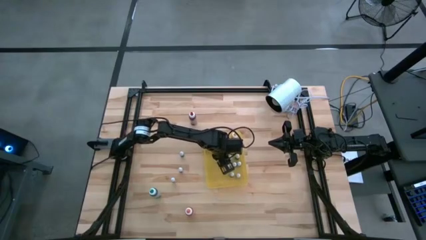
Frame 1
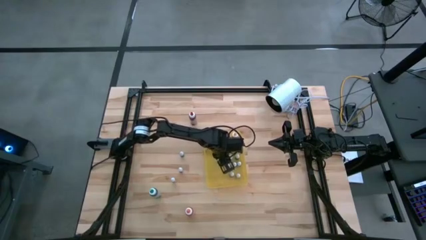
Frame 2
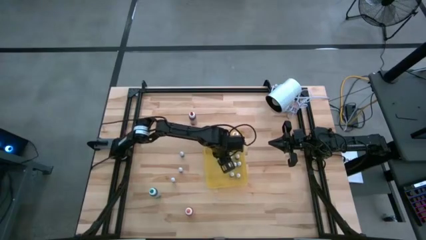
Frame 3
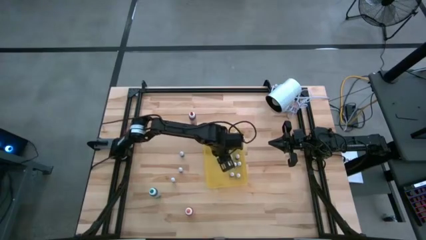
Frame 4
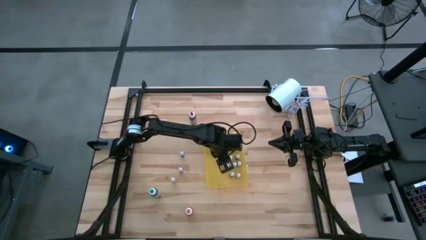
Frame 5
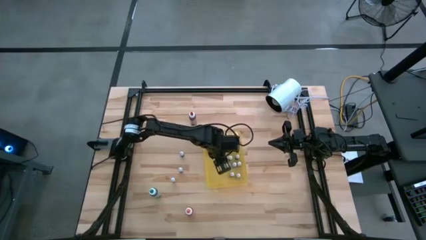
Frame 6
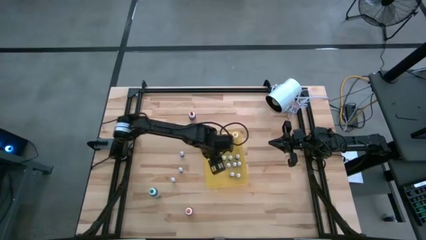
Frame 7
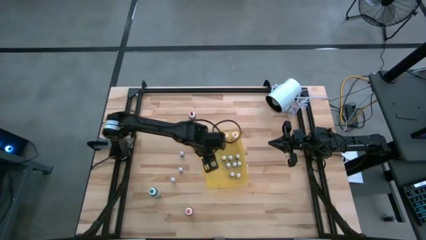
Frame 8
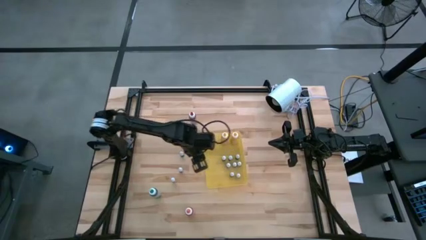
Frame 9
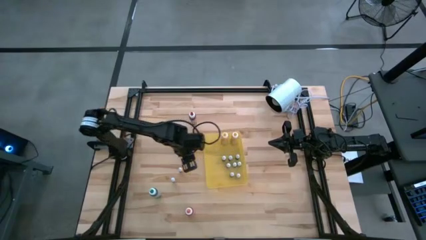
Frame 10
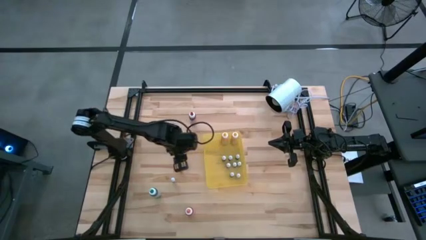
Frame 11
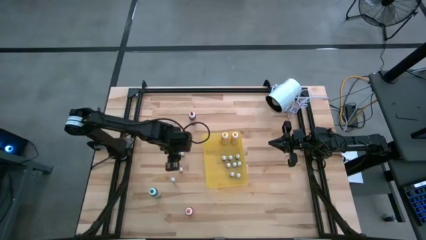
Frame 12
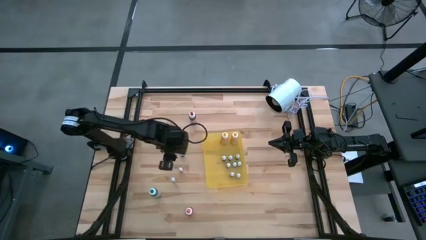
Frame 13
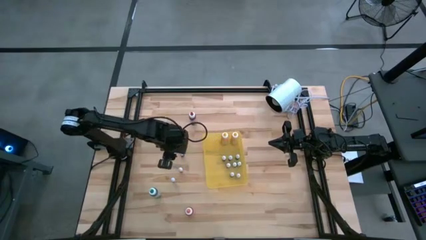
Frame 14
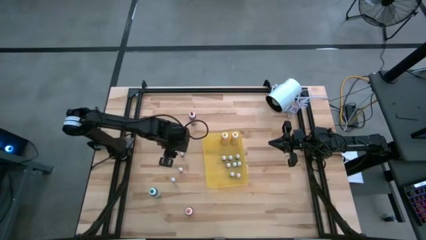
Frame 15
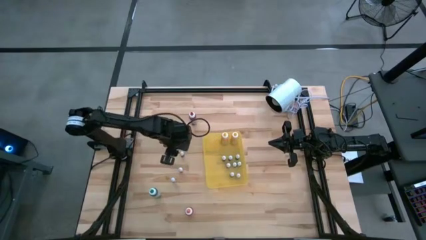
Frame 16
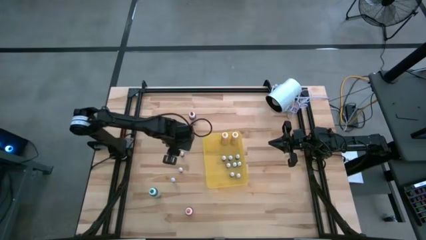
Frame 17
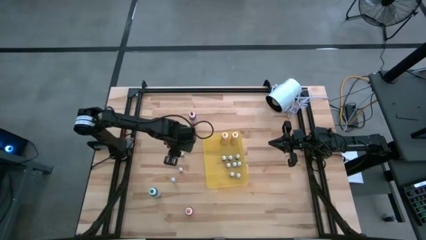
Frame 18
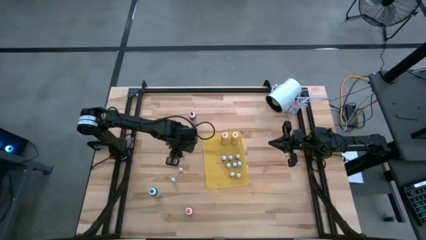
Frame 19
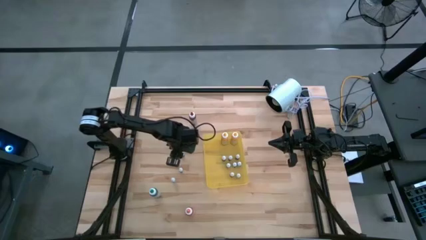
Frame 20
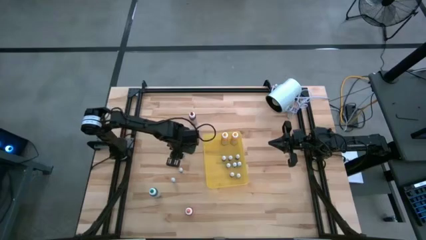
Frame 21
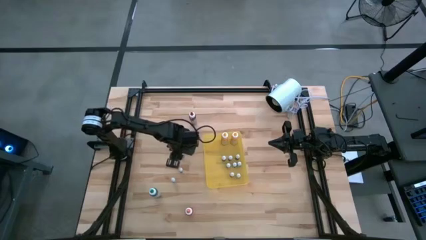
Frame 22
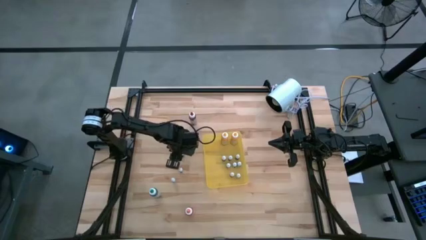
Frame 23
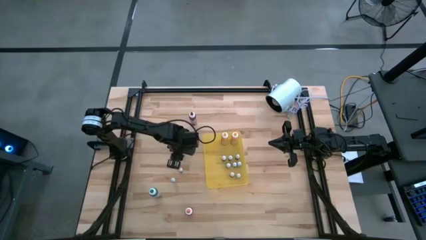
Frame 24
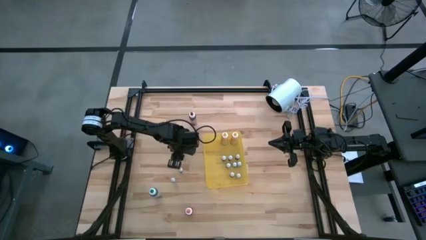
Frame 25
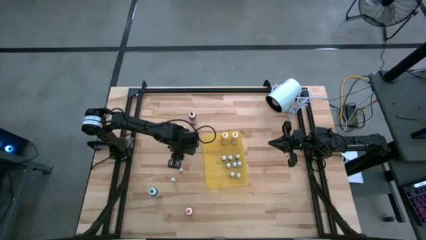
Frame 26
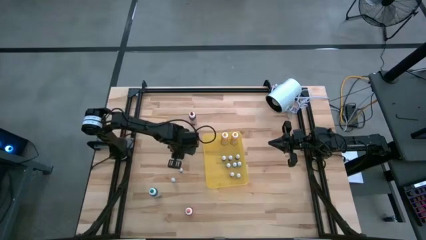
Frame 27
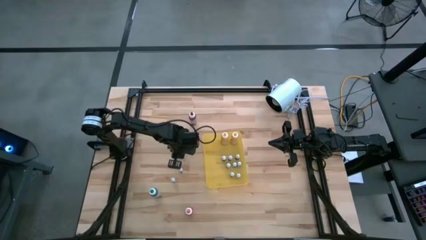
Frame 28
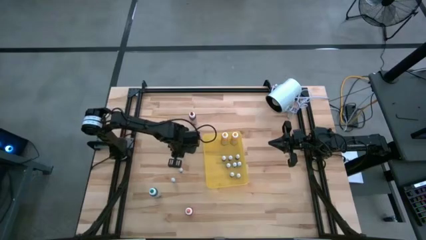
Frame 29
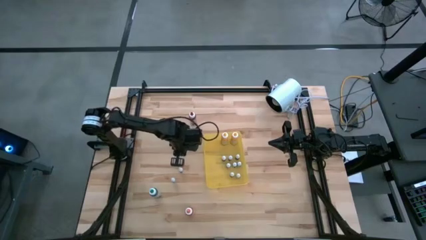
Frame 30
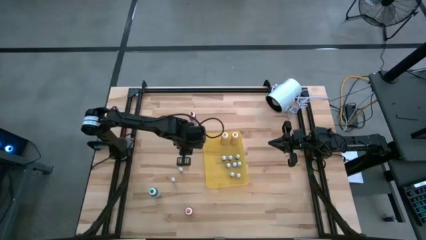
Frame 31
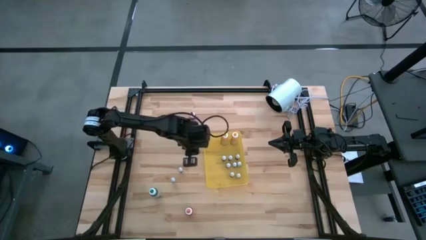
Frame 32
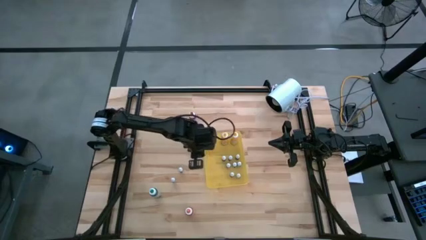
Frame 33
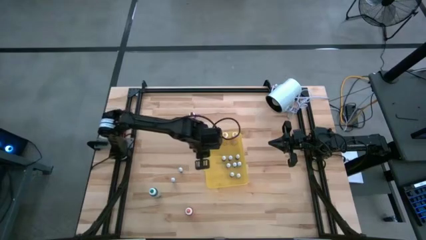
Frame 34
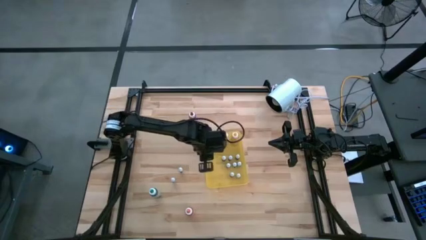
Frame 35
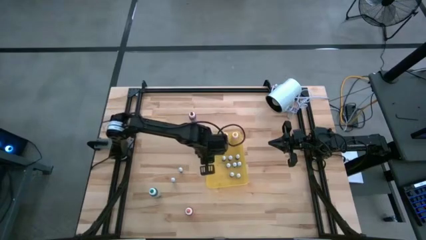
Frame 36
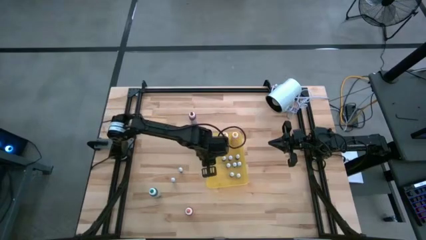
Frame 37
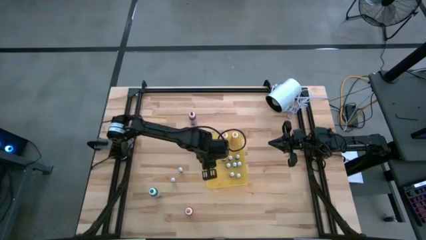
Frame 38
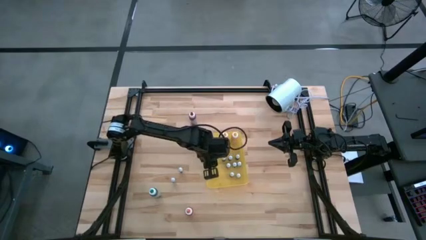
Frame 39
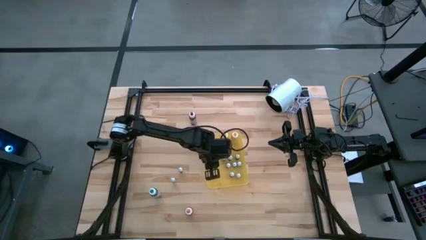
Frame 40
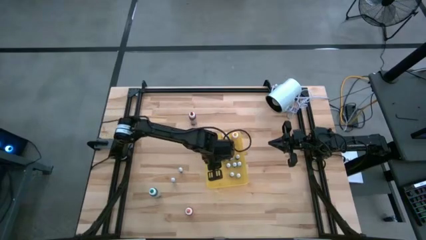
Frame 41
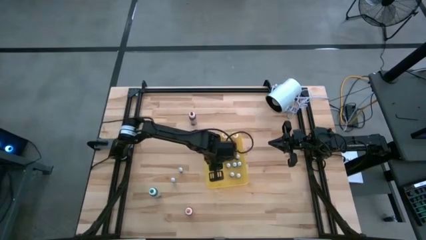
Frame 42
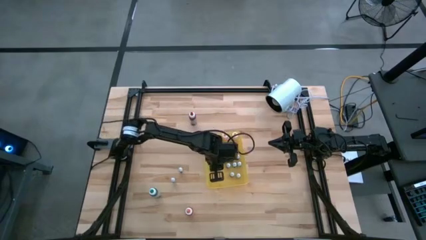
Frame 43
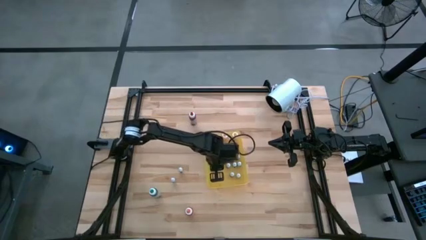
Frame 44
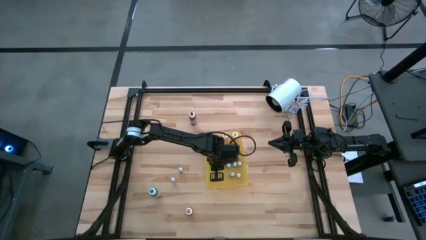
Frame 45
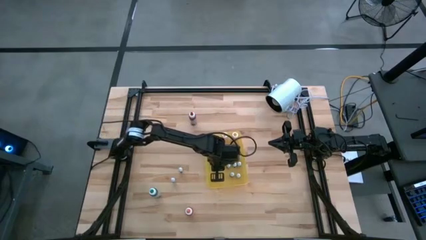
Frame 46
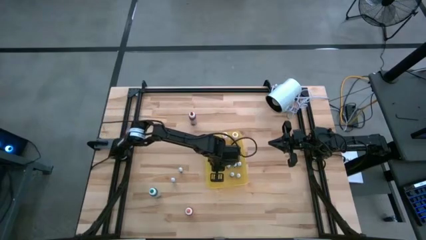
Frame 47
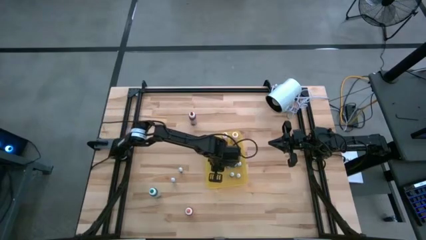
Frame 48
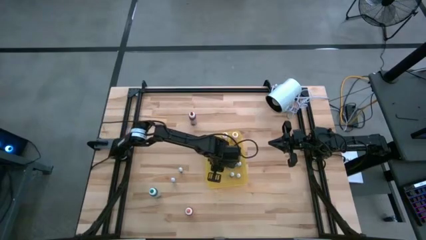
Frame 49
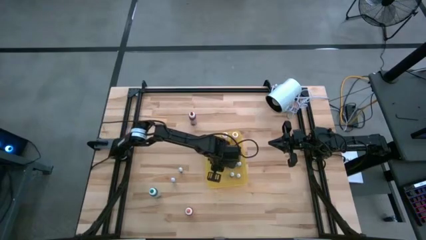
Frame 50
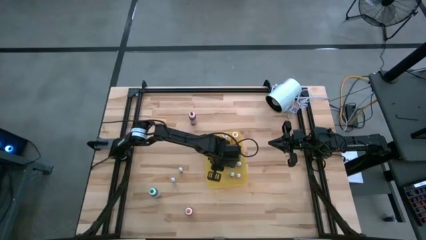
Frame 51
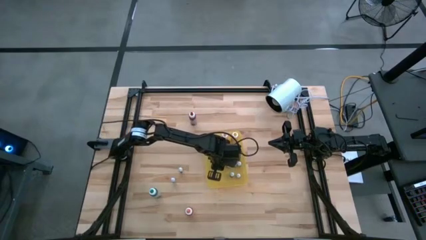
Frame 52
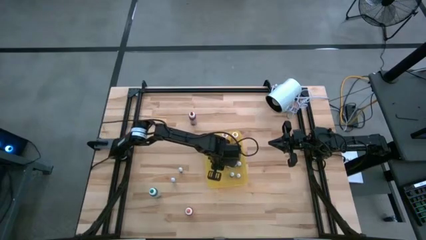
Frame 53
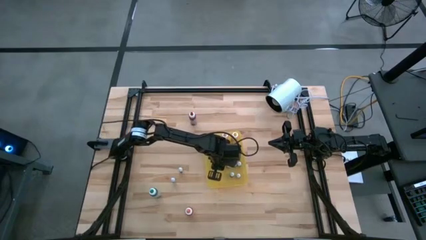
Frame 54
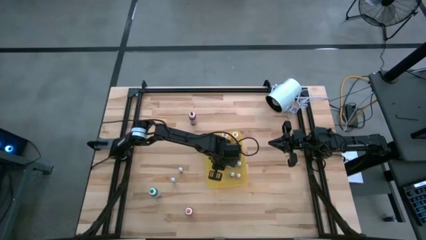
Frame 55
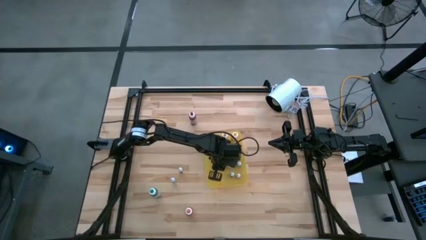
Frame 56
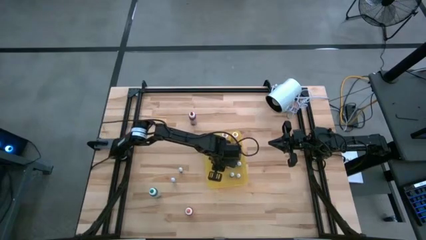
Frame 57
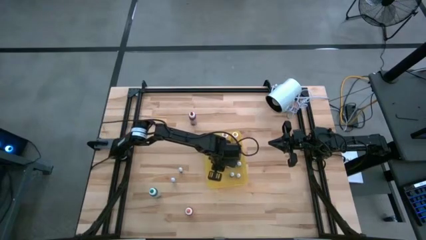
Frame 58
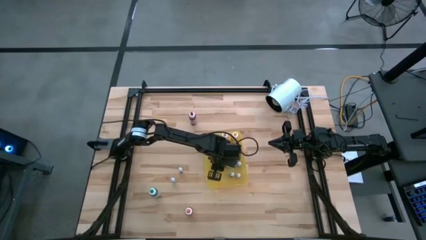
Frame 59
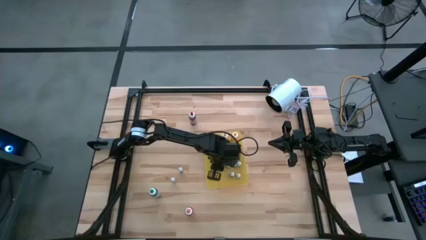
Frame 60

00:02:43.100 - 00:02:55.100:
Task: Pick & Place food coloring
Put the small blue food coloring bottle into the yellow bin
